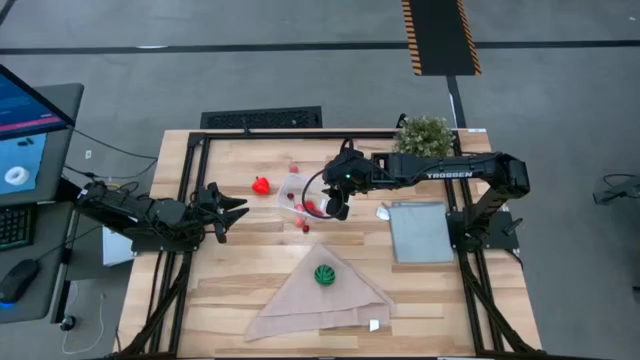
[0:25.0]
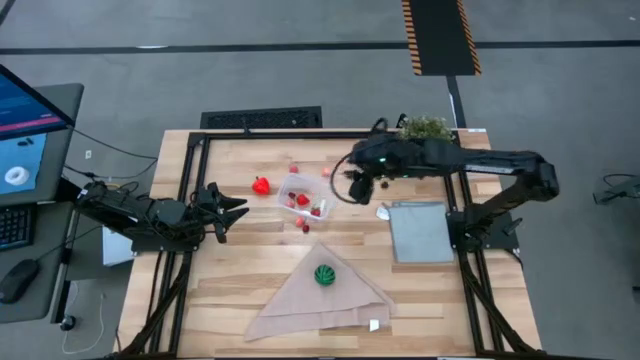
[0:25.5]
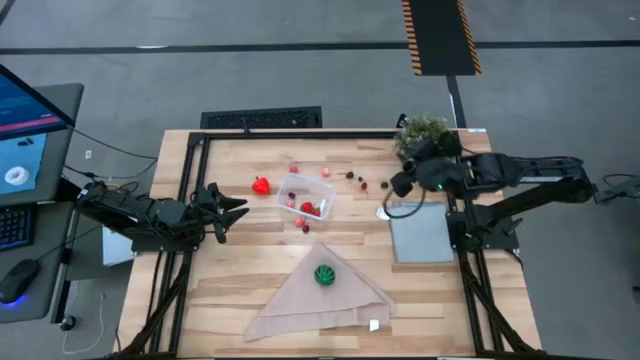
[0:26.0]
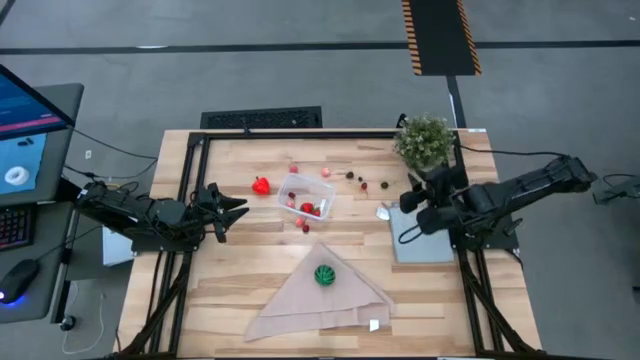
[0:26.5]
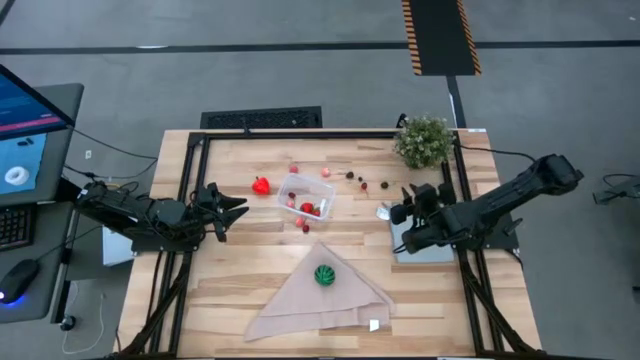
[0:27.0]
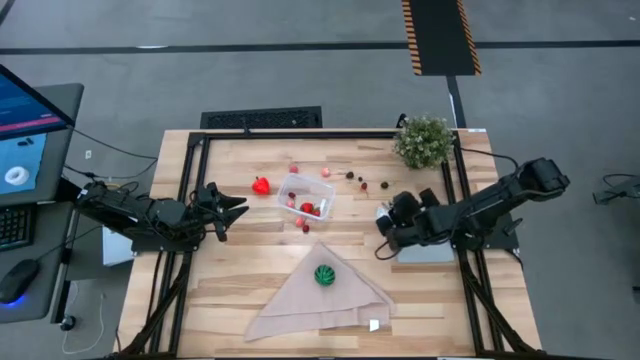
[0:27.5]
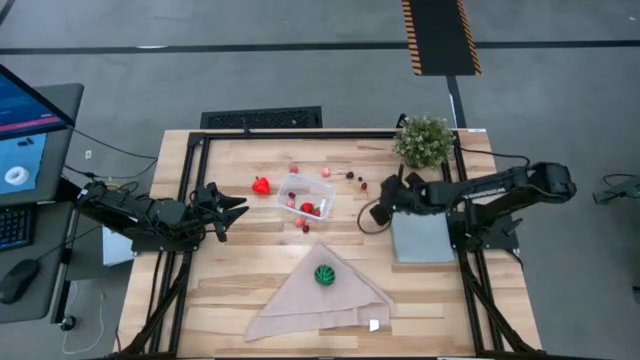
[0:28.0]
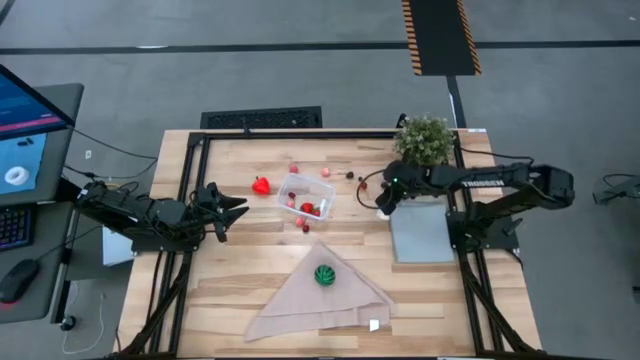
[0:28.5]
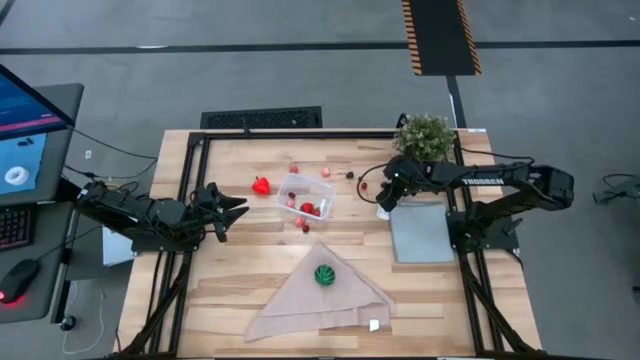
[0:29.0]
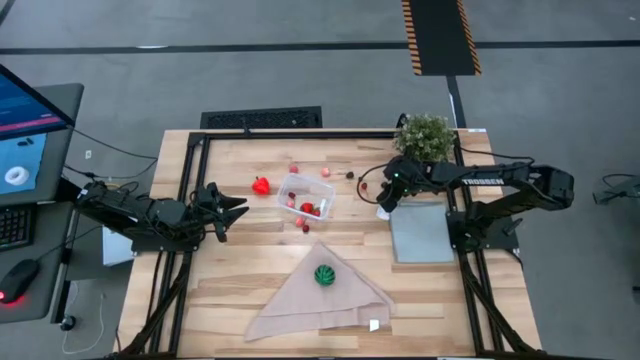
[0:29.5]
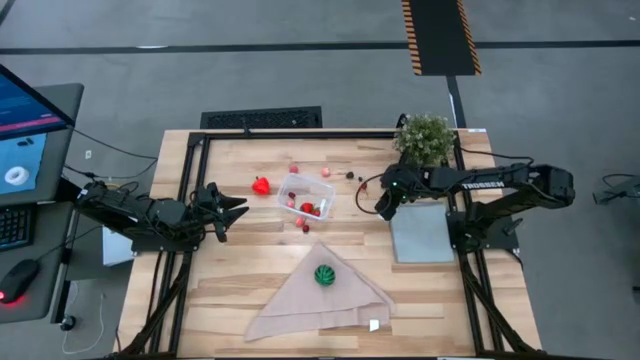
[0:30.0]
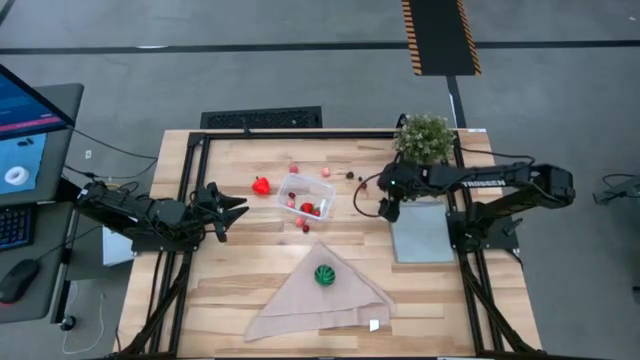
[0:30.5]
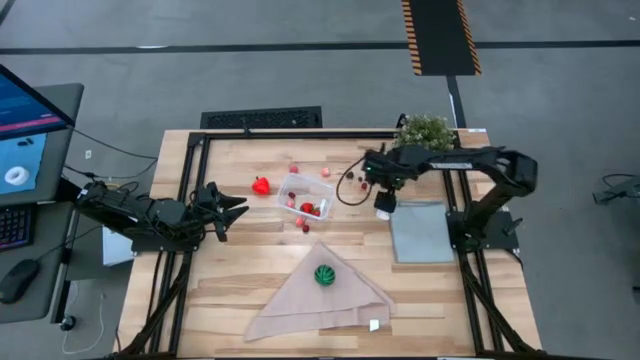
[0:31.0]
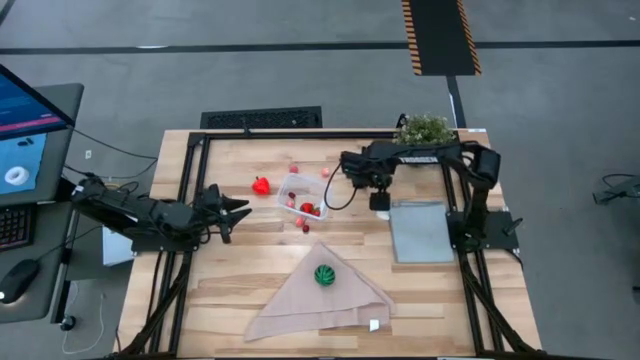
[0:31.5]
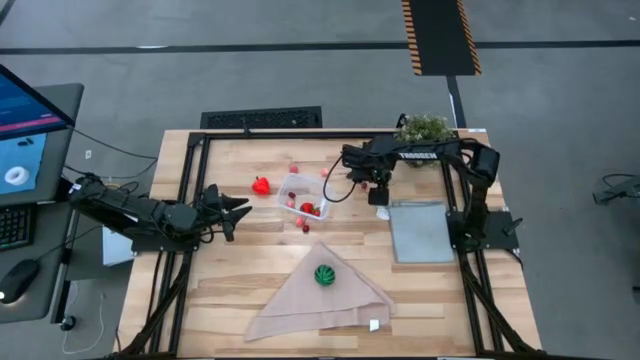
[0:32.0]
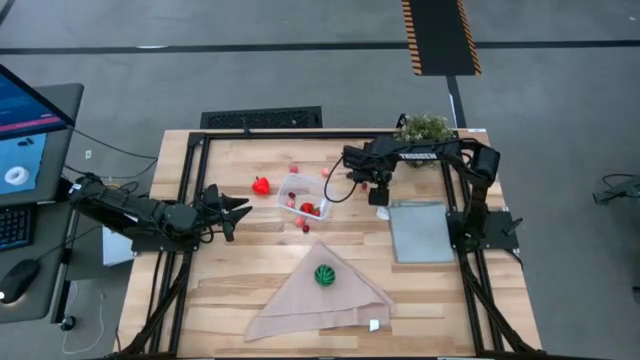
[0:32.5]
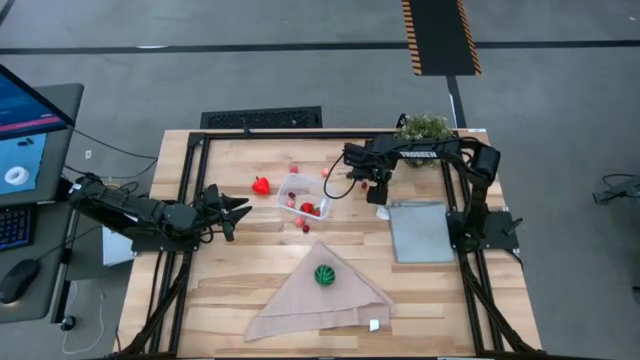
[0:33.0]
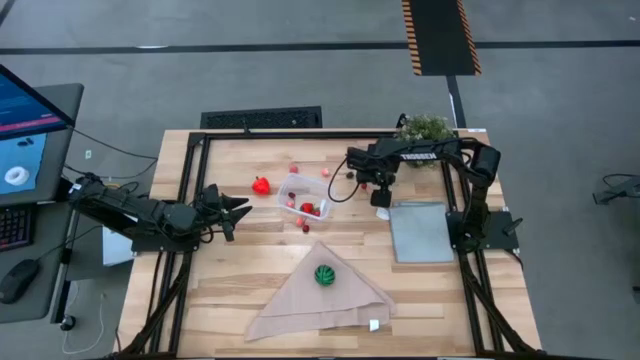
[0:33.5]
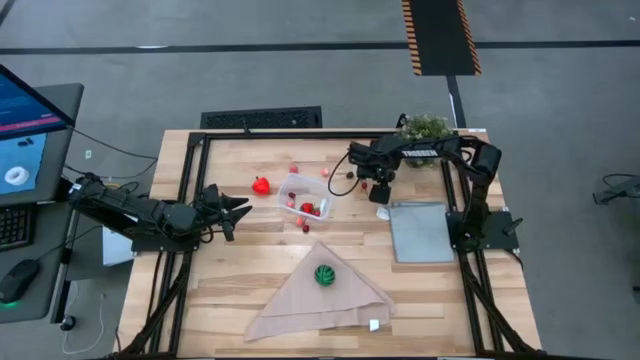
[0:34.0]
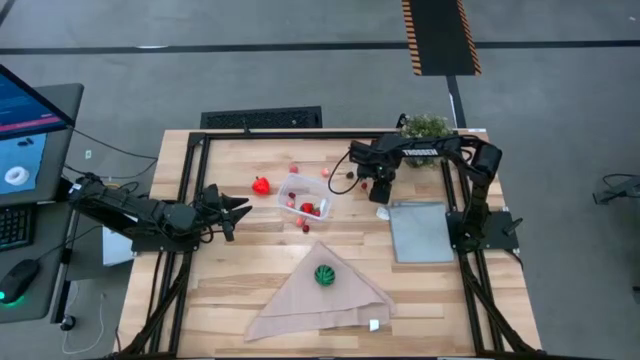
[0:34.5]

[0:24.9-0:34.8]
Task: Pick and placing Produce into tupperware
Put the black cherry into the transparent bin

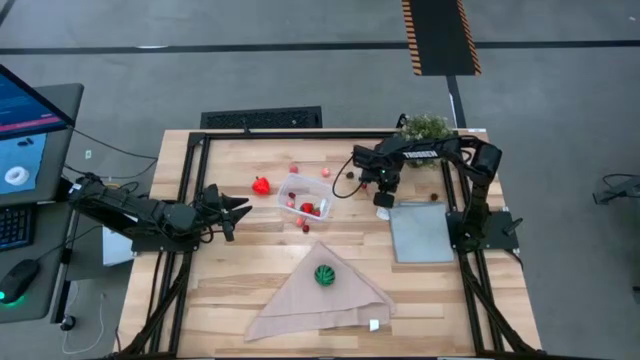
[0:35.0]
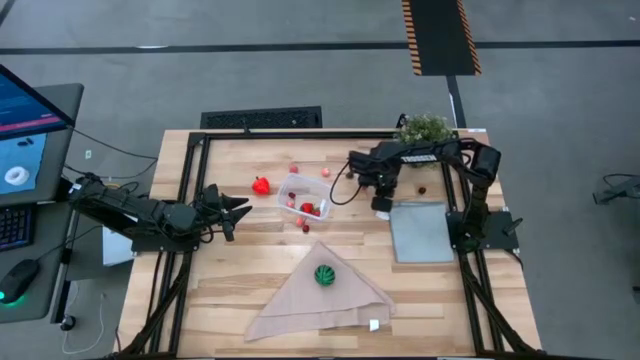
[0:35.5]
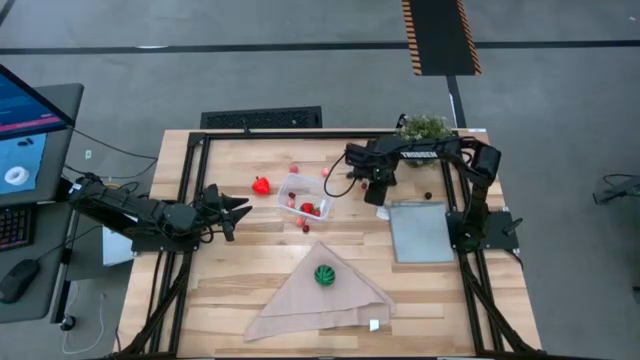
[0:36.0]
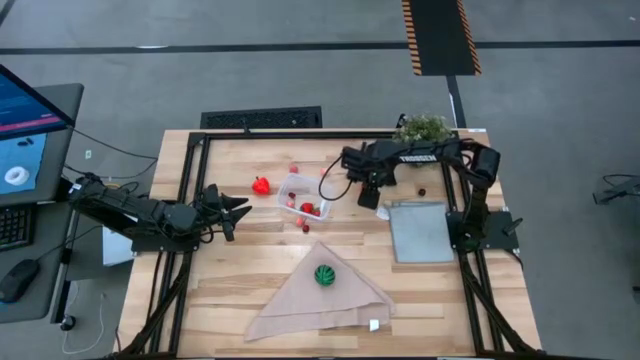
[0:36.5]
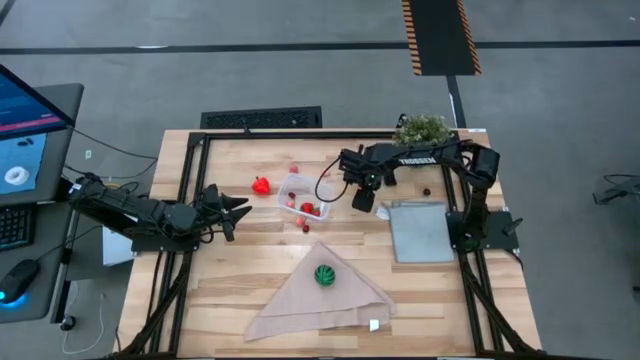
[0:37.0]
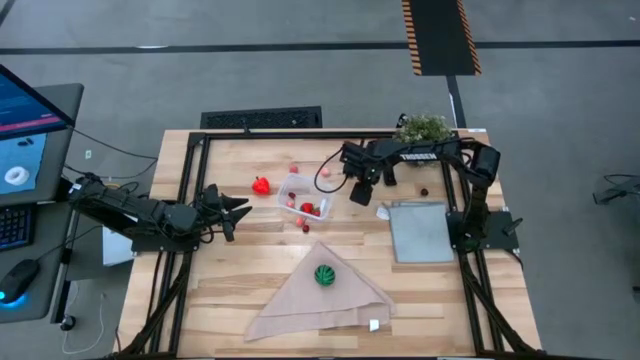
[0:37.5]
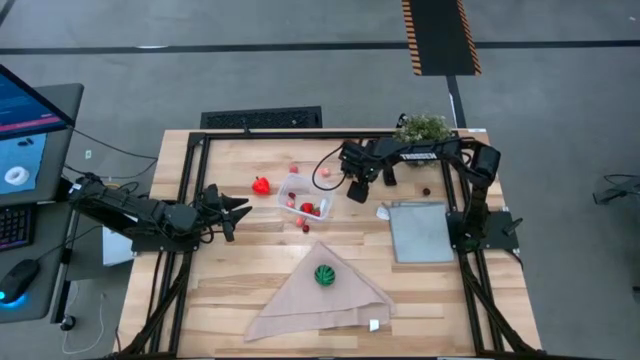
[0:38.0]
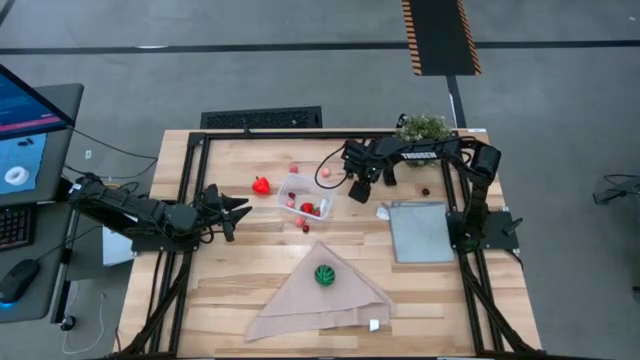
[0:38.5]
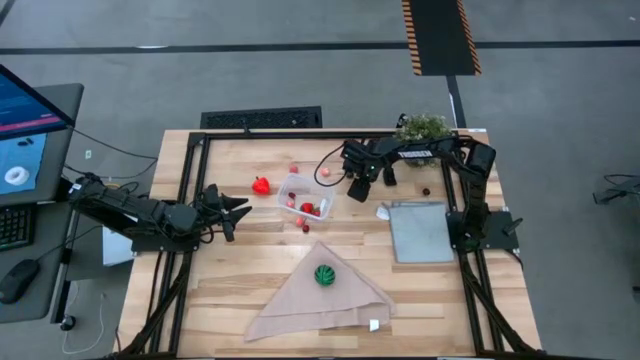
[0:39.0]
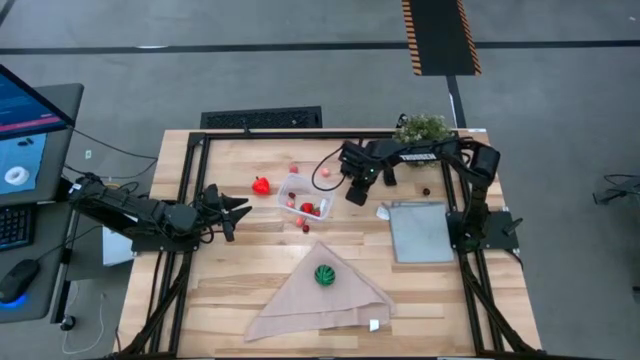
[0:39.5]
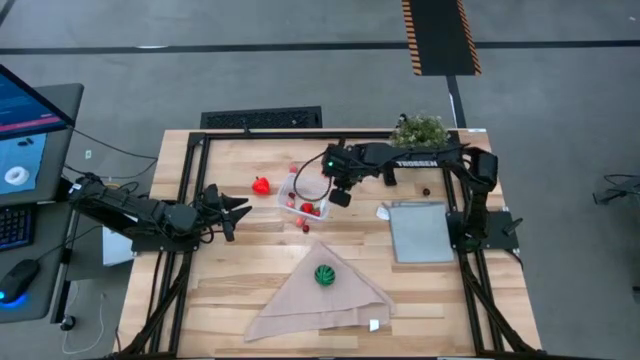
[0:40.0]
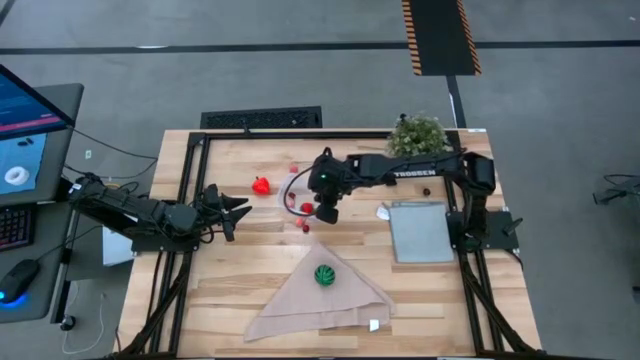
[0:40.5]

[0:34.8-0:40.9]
Put the top red cherry into the transparent bin

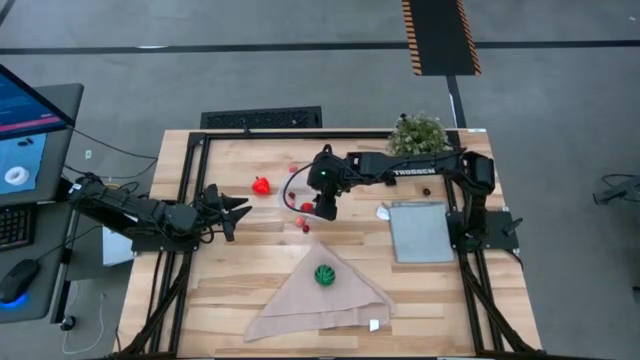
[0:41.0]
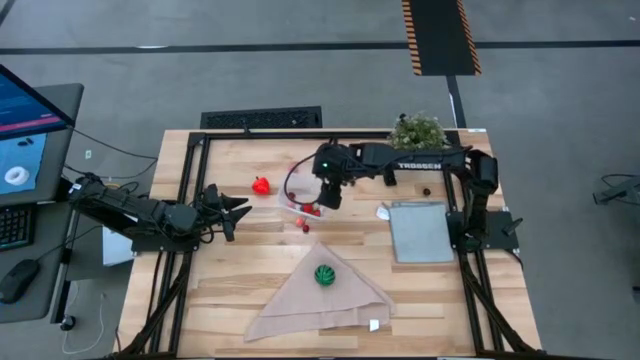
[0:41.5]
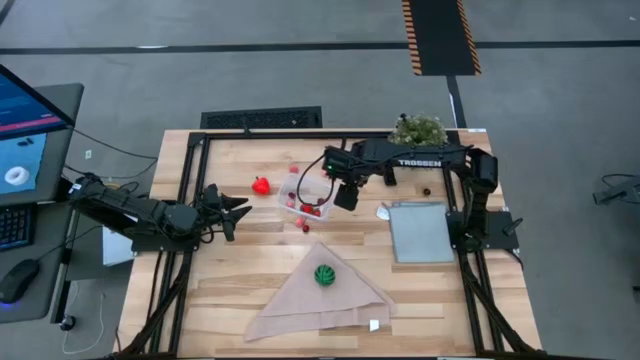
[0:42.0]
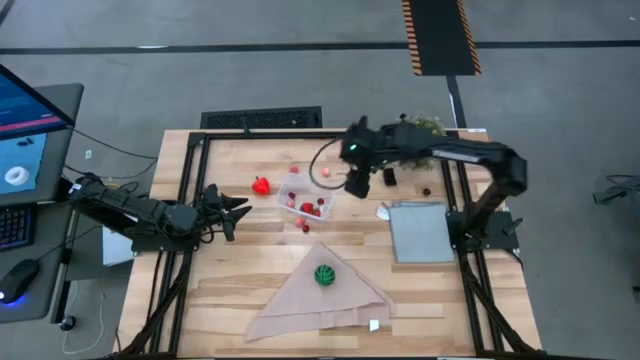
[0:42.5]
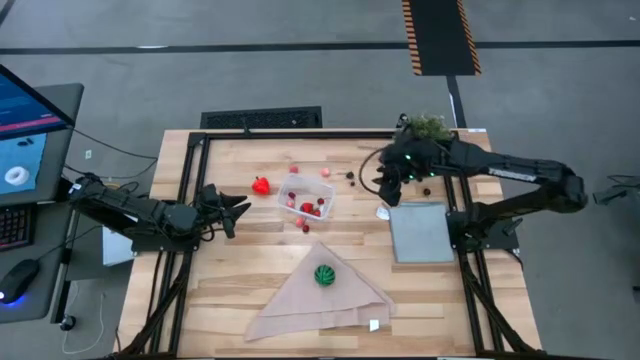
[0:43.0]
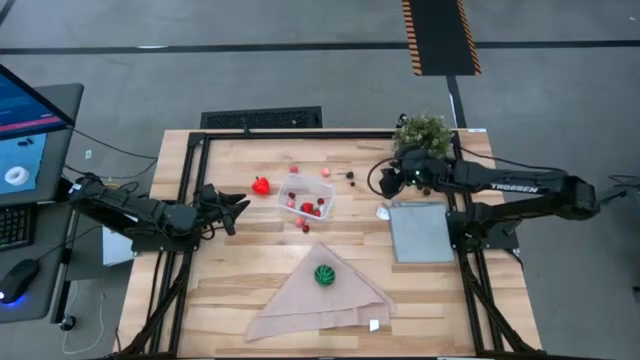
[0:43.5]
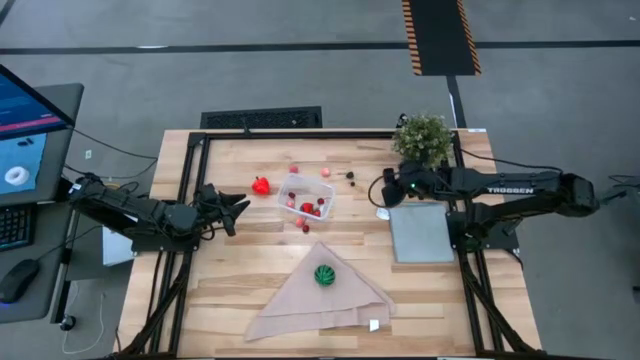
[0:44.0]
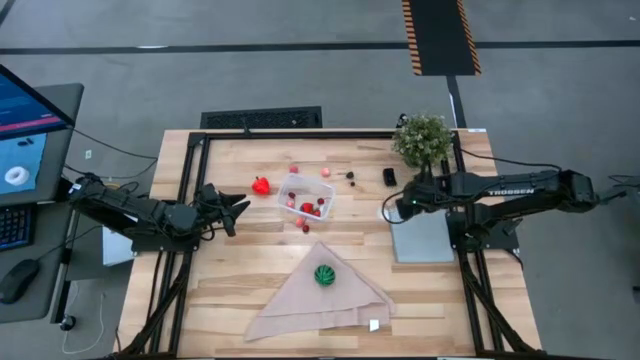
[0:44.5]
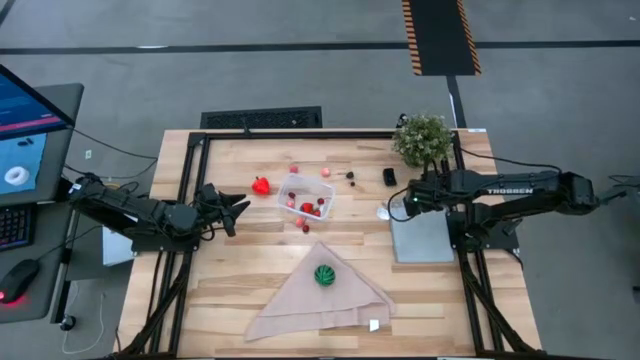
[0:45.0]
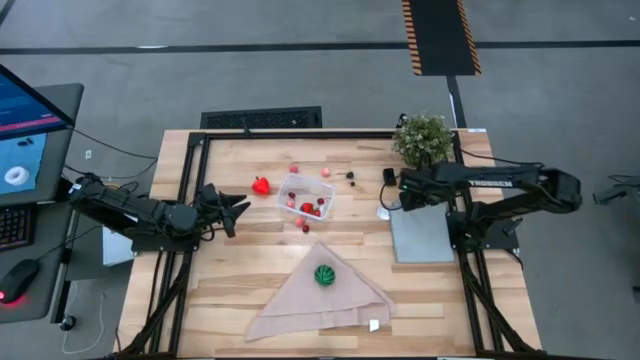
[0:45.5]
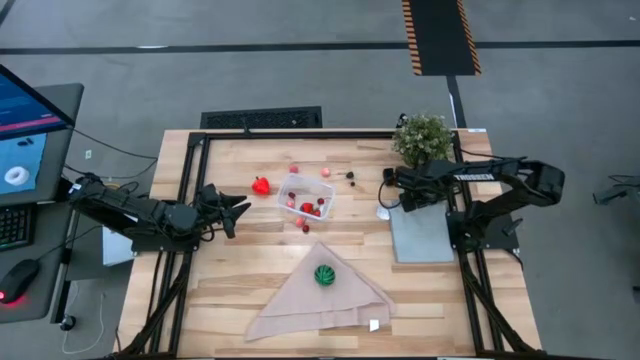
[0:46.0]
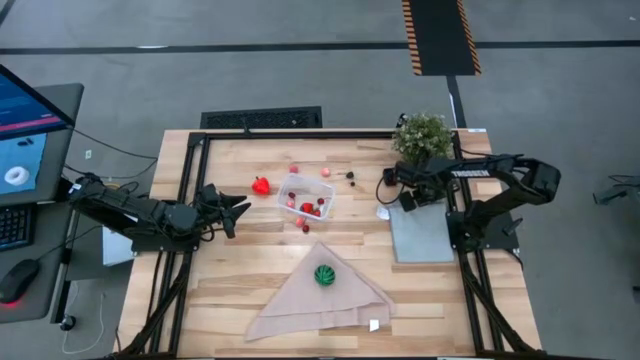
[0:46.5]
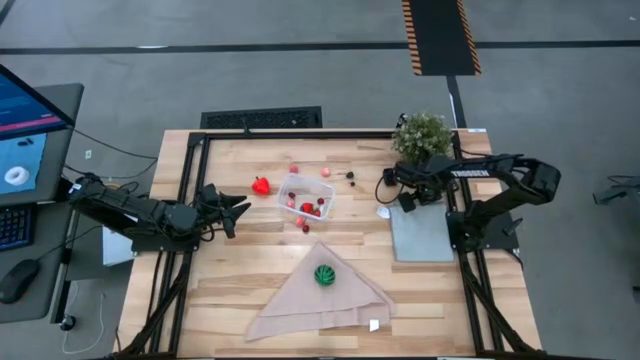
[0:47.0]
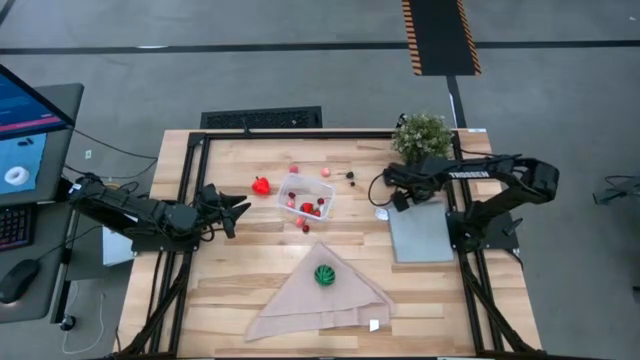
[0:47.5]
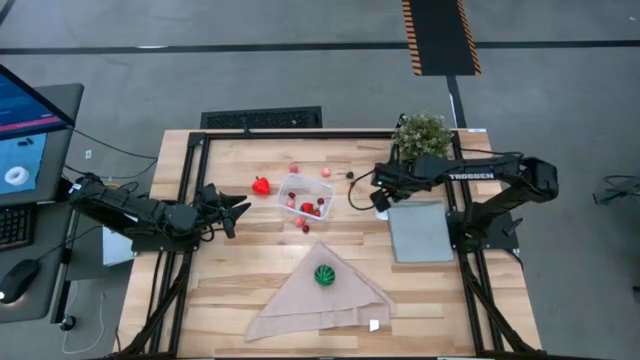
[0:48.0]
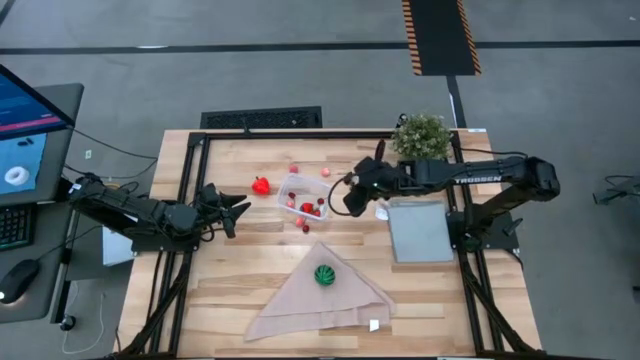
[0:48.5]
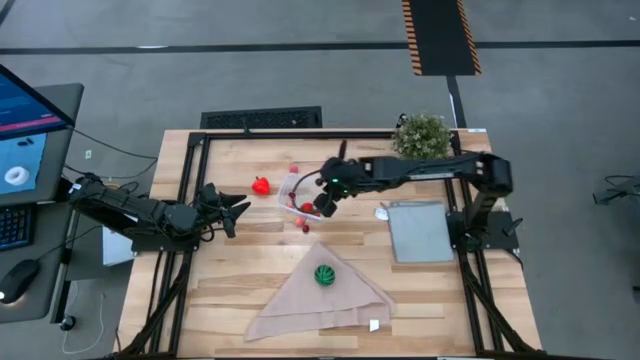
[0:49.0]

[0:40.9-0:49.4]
Put the black cherry into the transparent bin
